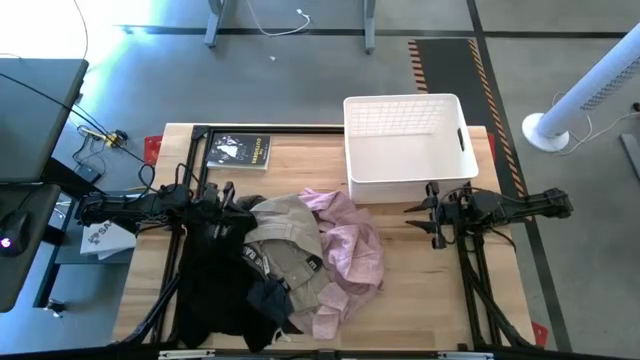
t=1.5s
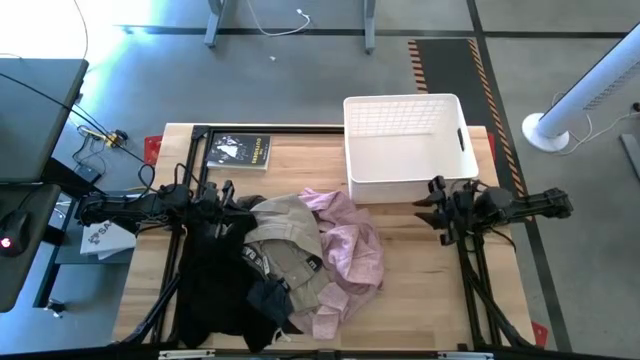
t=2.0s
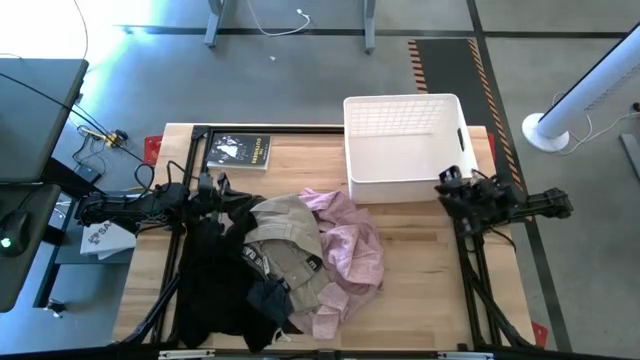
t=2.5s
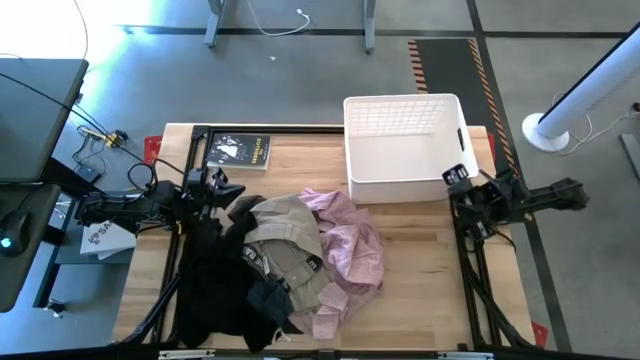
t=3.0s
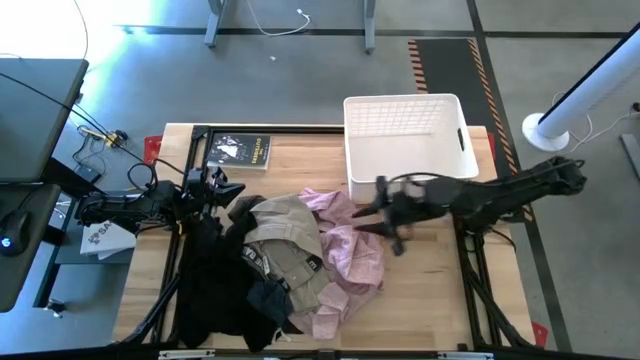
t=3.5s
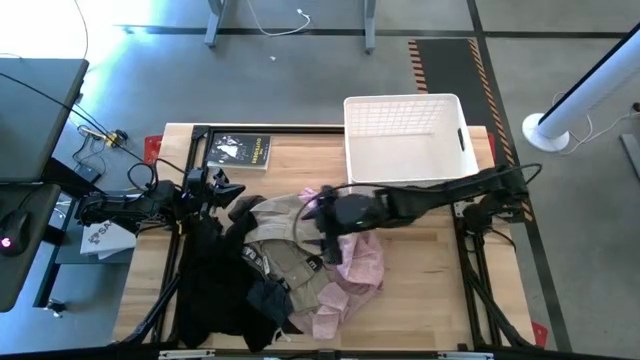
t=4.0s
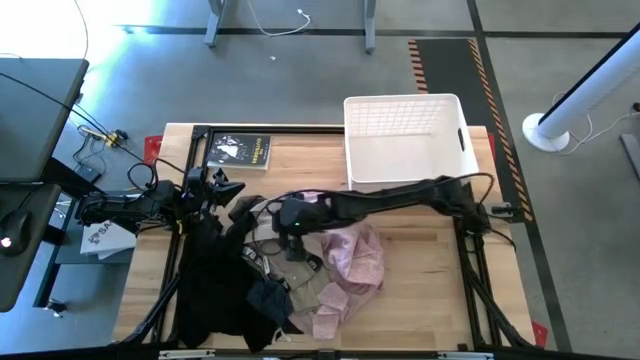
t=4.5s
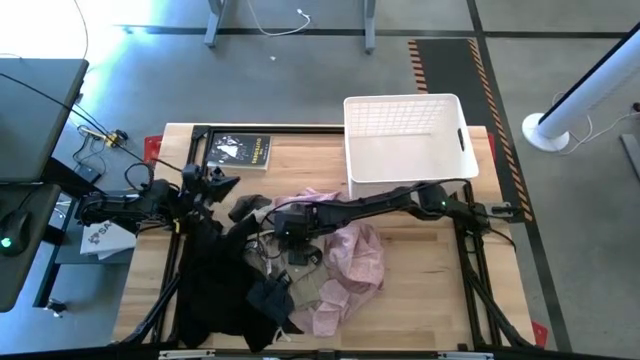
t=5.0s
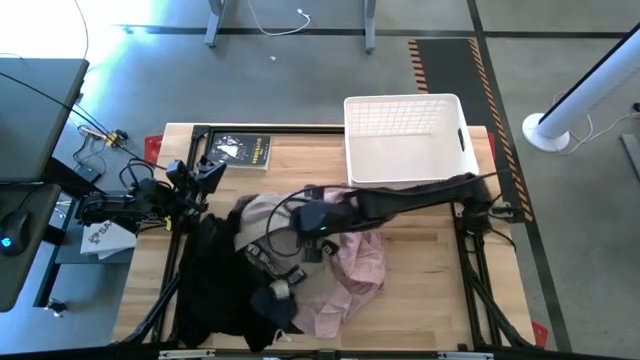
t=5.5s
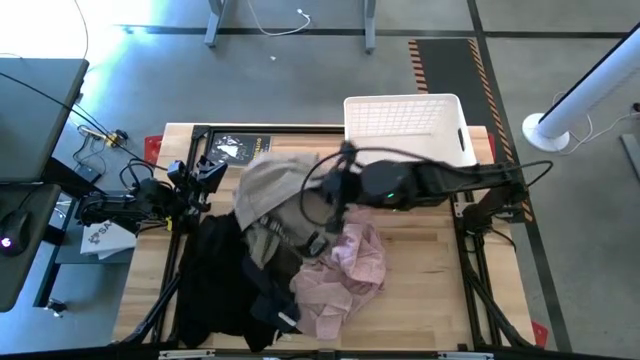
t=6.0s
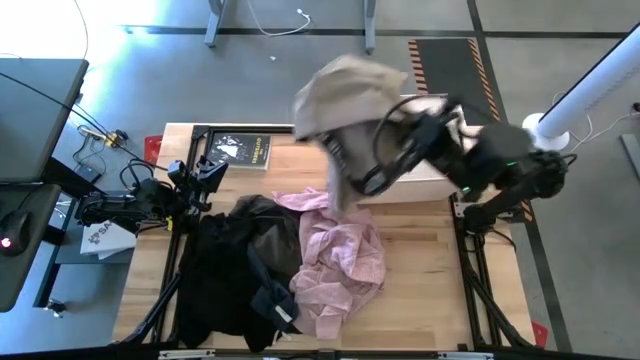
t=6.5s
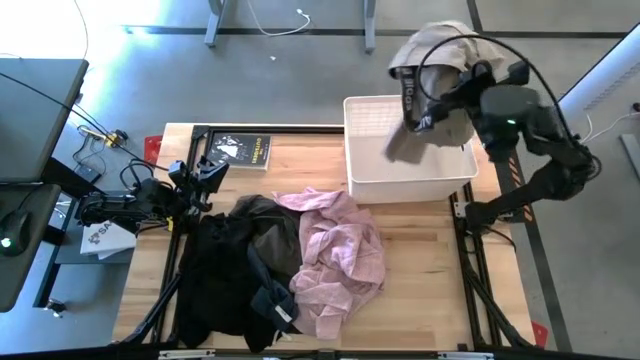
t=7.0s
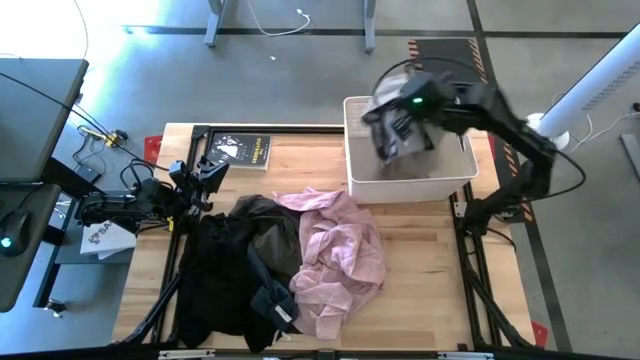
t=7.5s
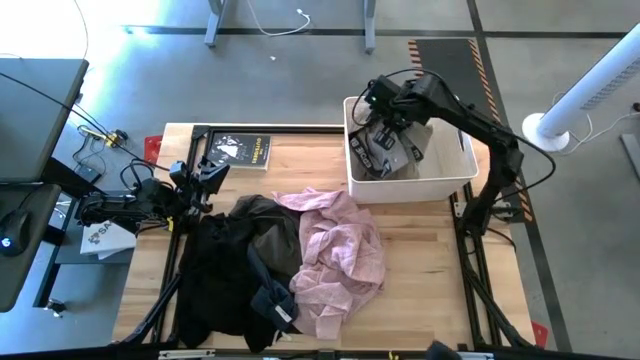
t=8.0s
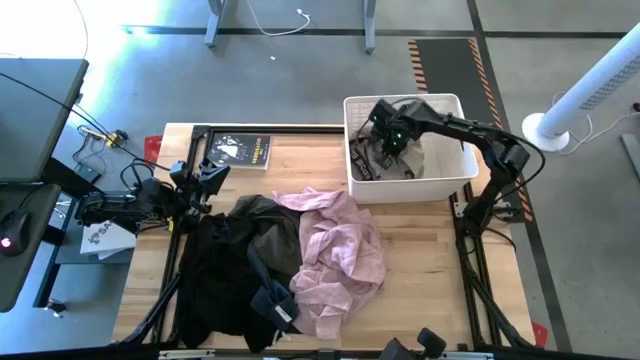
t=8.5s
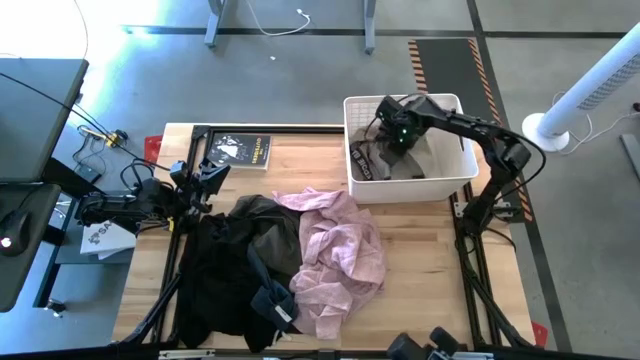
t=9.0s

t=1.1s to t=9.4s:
Task: Sort clothes
Put the brown shorts into the white bin

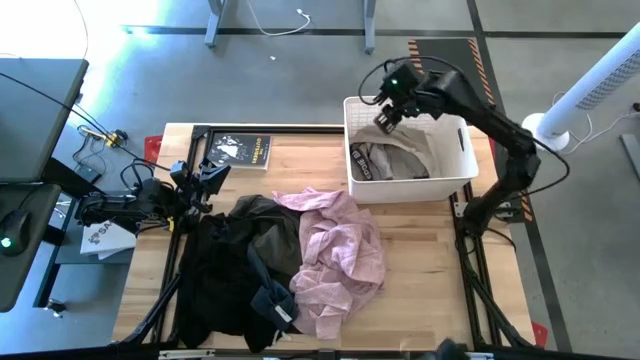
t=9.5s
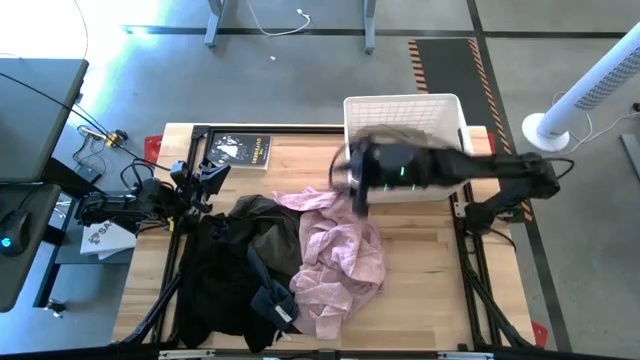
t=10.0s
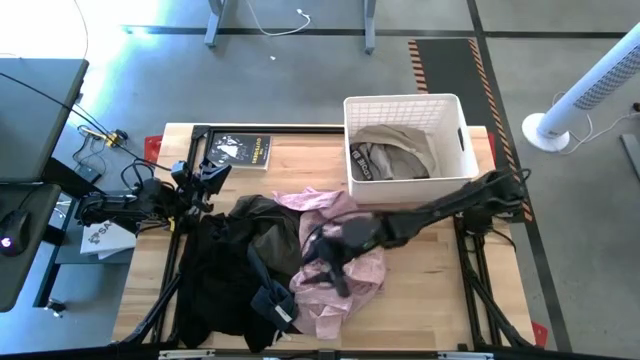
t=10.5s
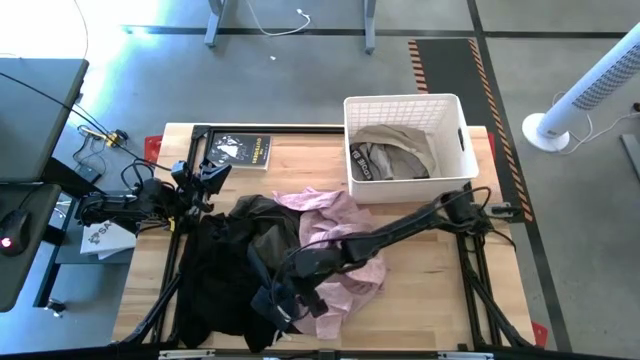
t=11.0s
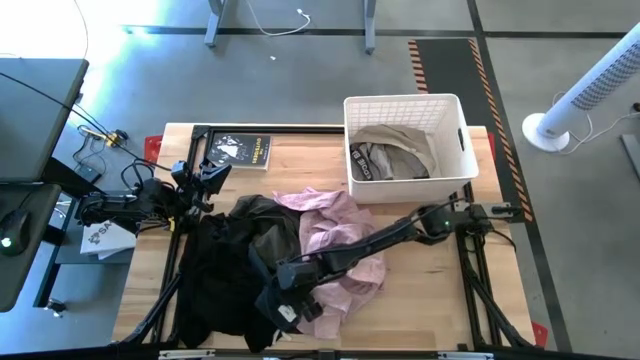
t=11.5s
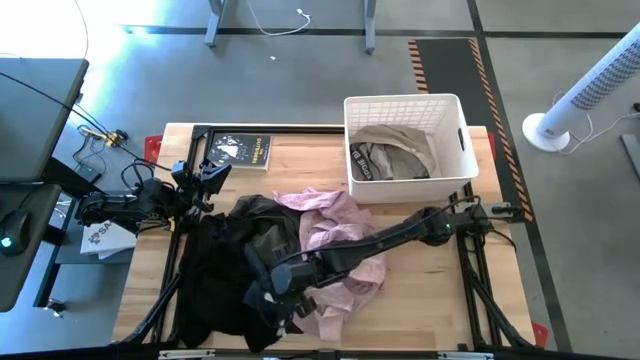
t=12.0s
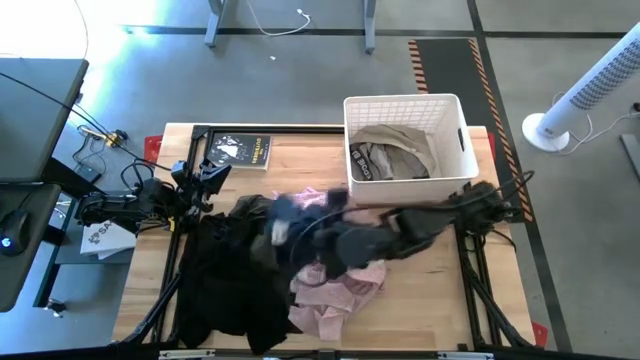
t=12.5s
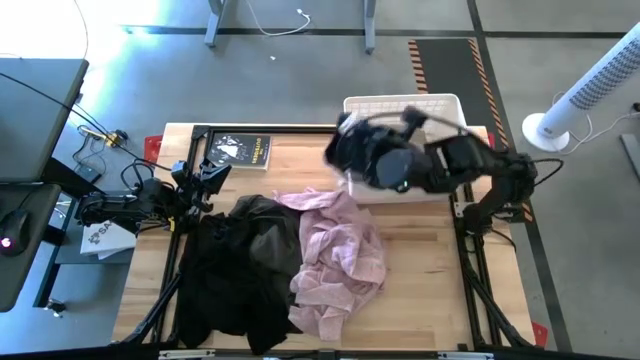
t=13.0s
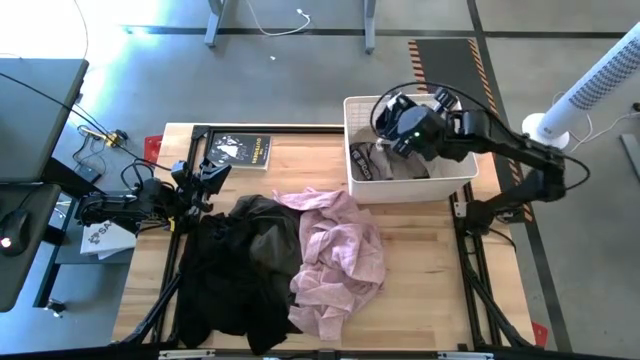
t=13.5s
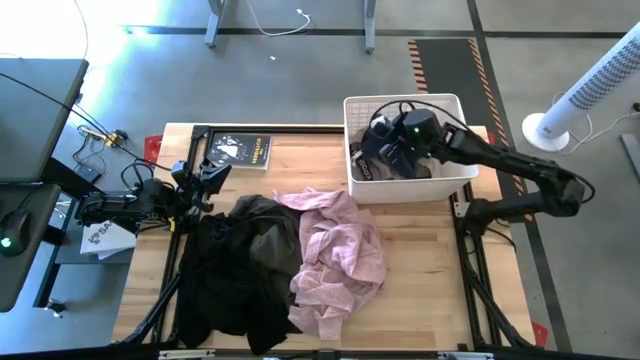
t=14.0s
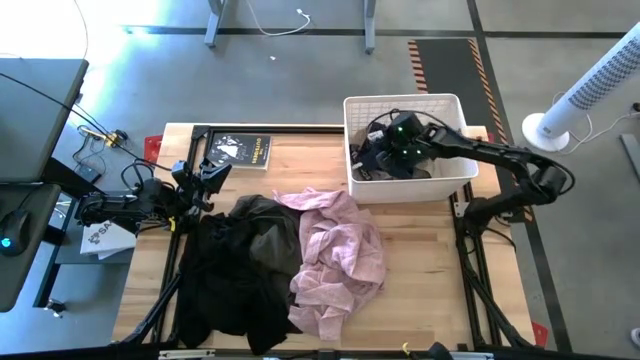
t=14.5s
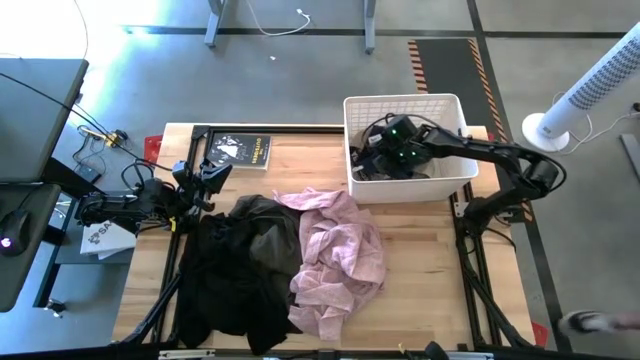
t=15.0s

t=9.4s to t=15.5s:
Put the blue short into the white bin

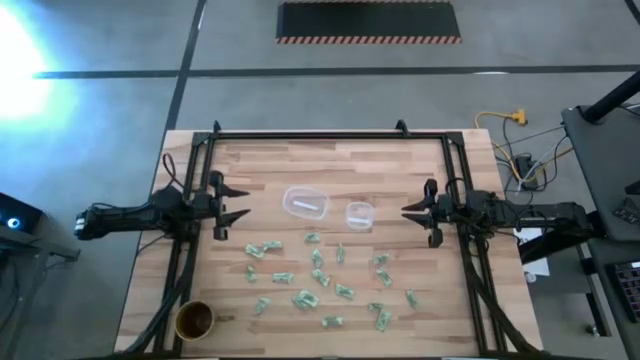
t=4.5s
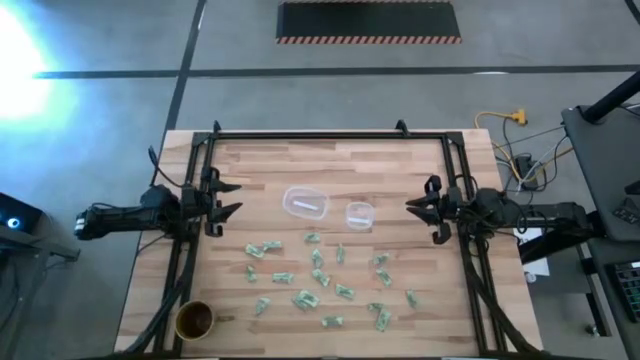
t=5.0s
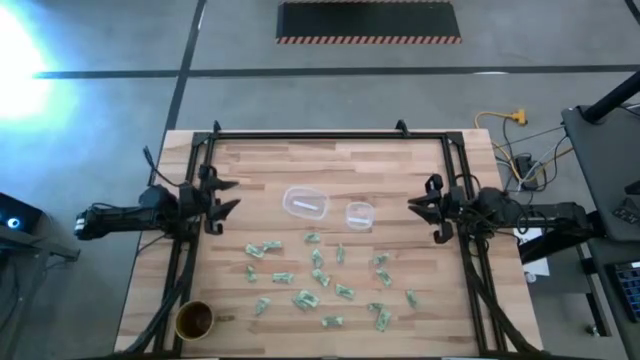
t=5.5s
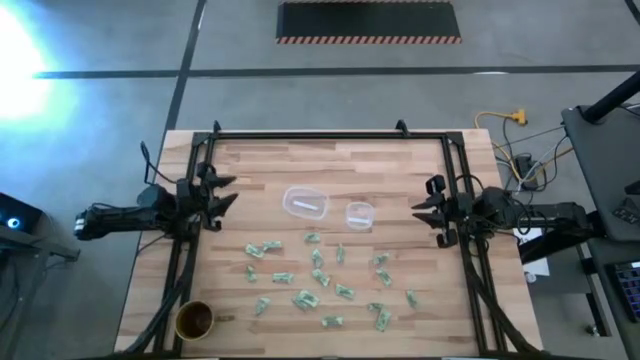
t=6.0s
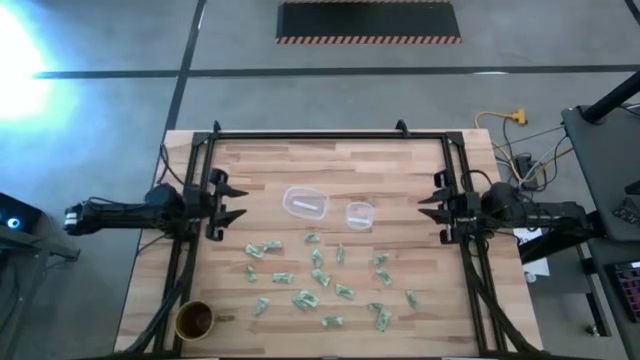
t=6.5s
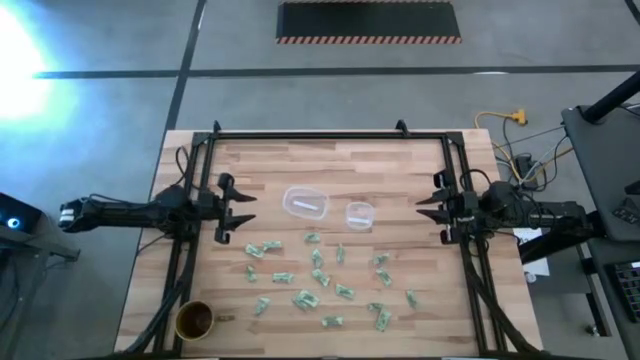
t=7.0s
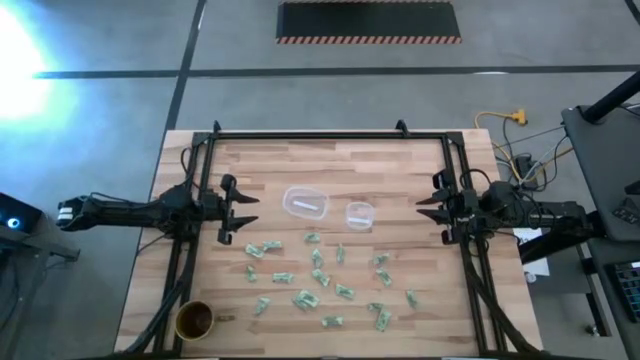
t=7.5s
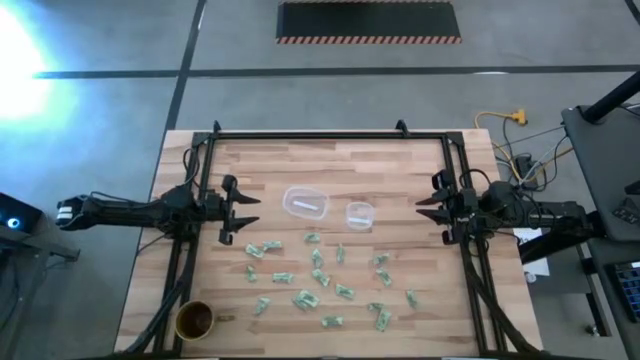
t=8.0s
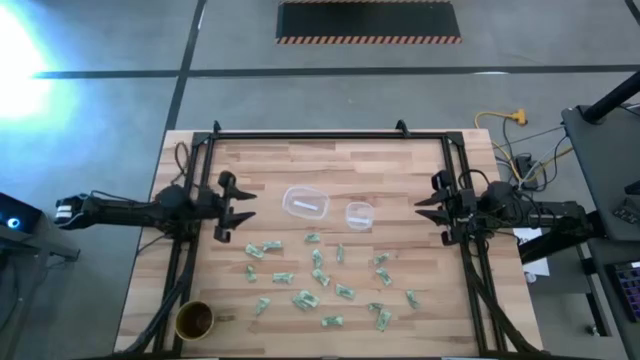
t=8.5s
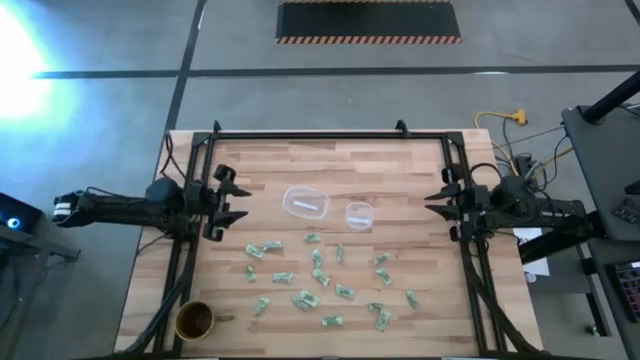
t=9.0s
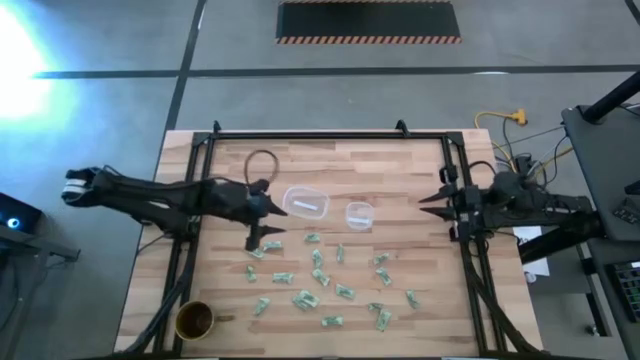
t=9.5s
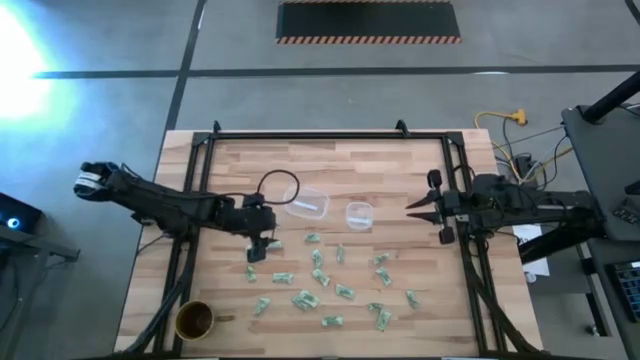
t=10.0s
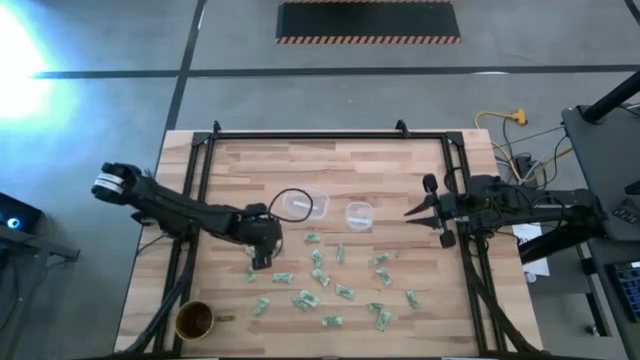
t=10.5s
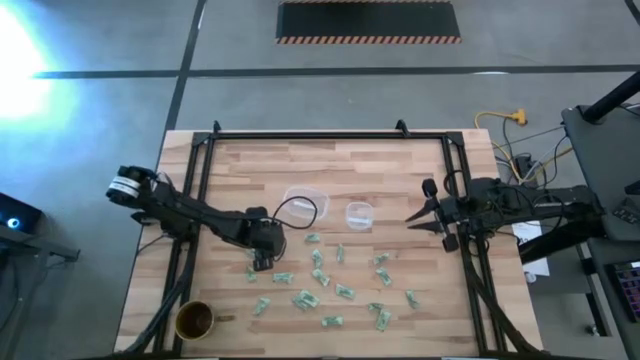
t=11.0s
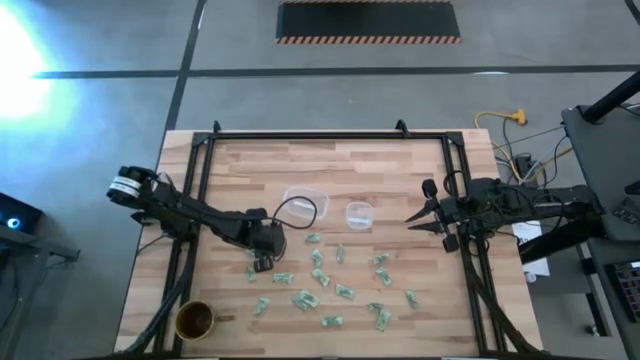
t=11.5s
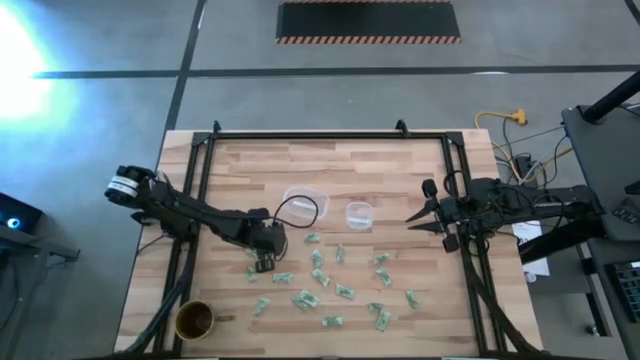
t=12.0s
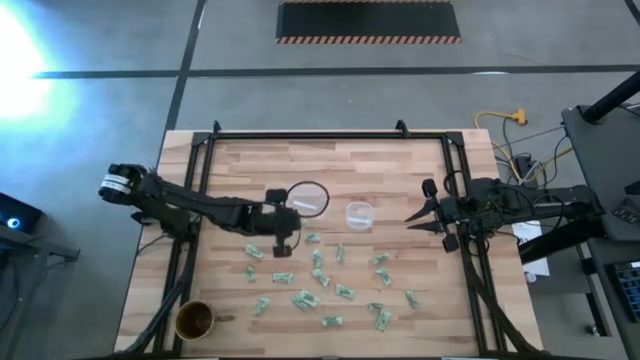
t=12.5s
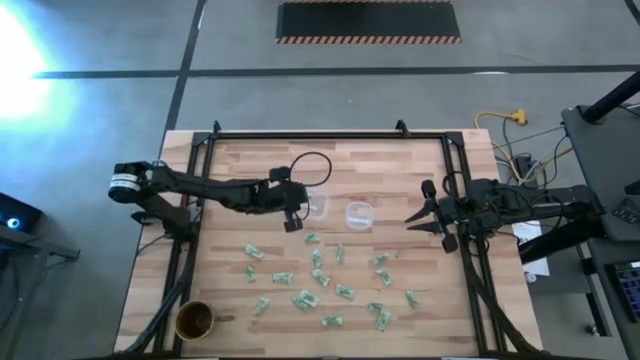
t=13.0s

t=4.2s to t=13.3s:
Task: Pick and place items into bin
Put the green stevia packet into the left transparent bin
